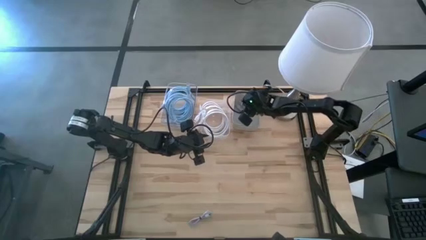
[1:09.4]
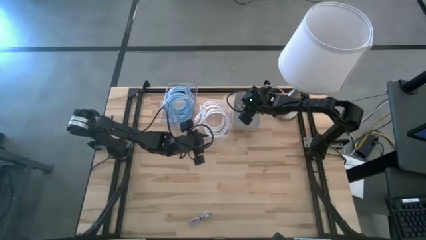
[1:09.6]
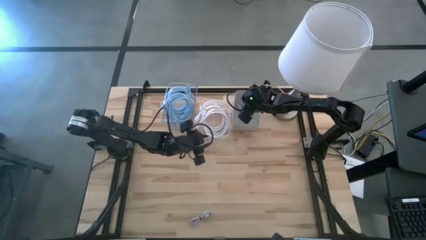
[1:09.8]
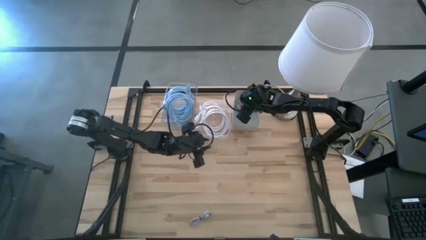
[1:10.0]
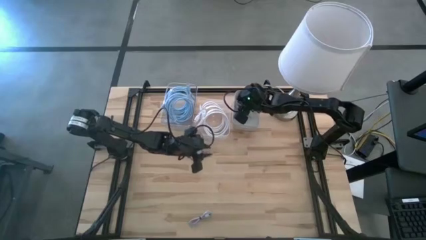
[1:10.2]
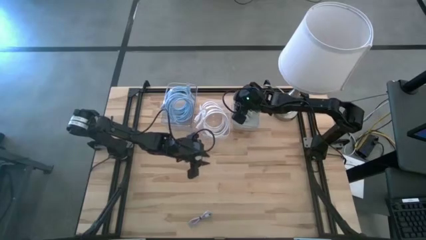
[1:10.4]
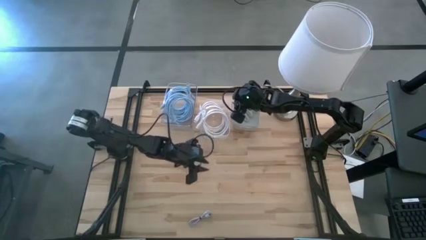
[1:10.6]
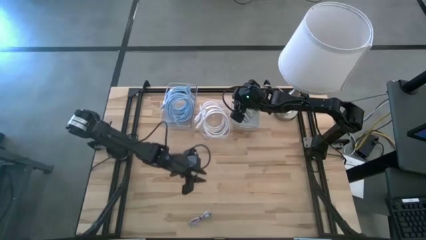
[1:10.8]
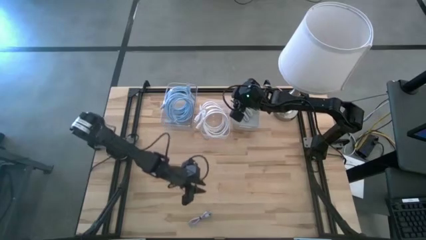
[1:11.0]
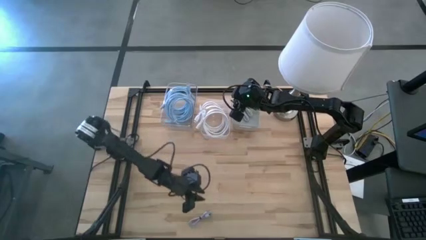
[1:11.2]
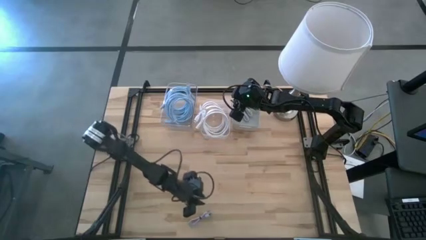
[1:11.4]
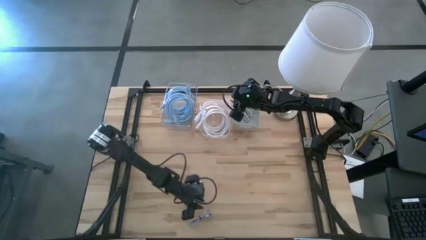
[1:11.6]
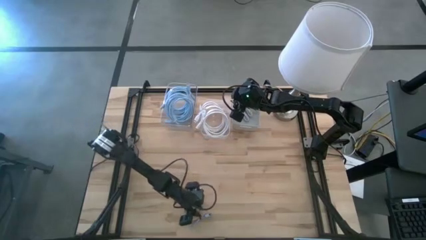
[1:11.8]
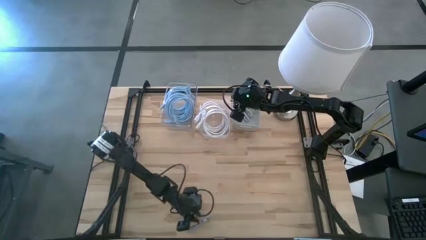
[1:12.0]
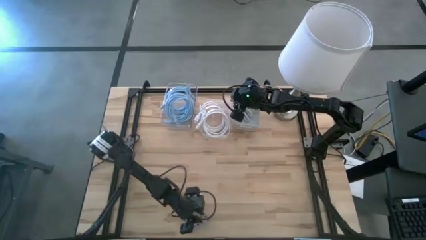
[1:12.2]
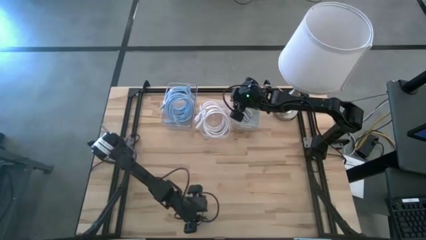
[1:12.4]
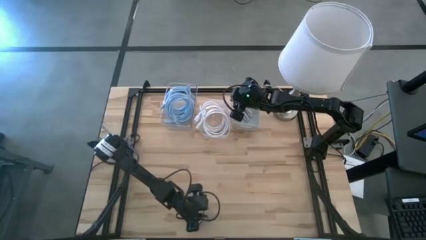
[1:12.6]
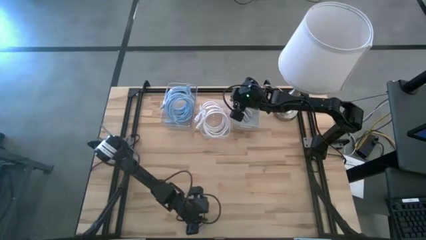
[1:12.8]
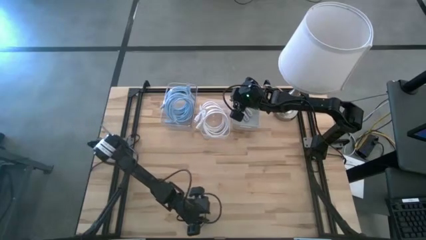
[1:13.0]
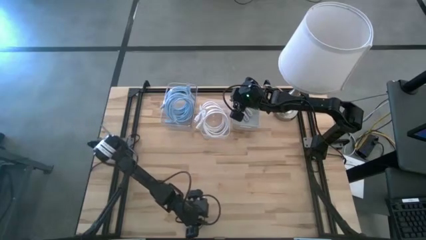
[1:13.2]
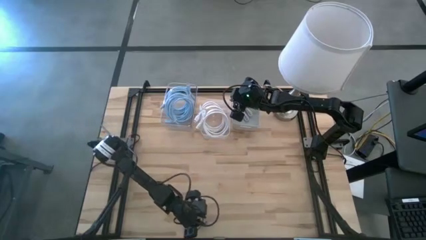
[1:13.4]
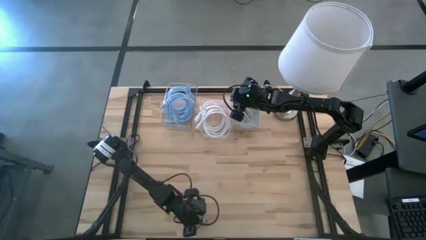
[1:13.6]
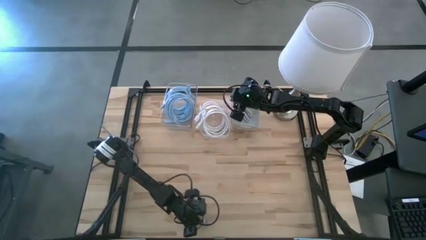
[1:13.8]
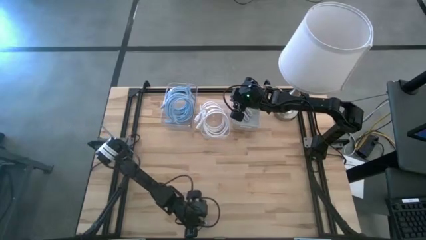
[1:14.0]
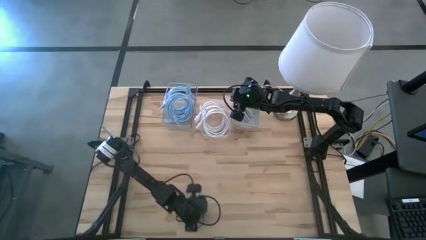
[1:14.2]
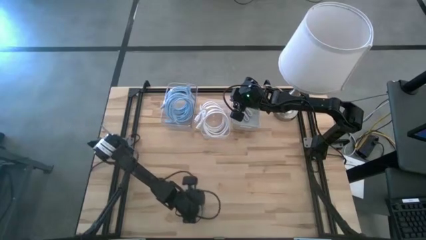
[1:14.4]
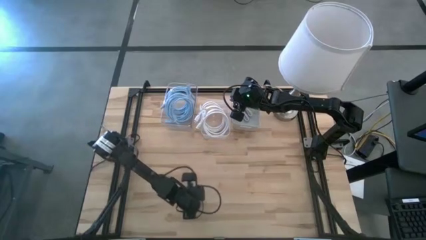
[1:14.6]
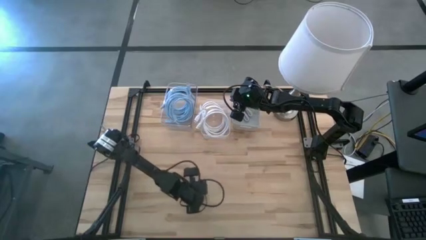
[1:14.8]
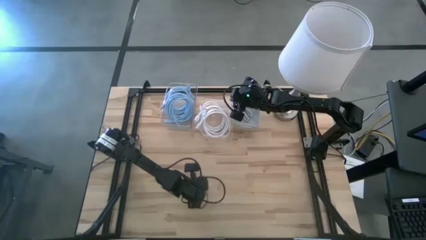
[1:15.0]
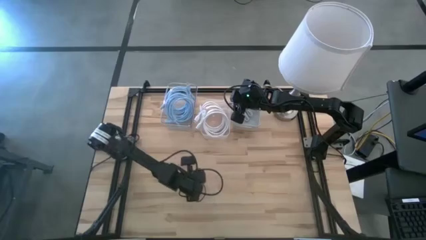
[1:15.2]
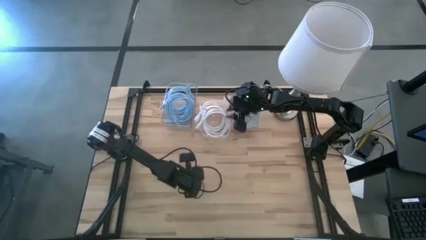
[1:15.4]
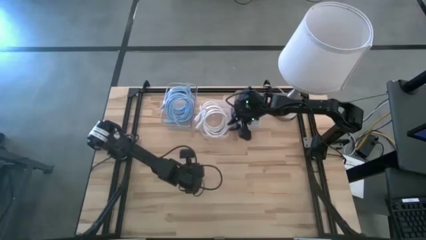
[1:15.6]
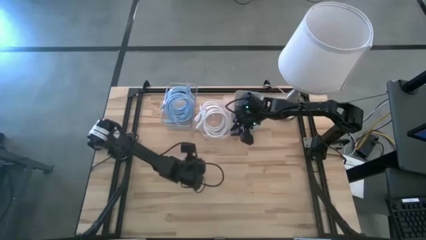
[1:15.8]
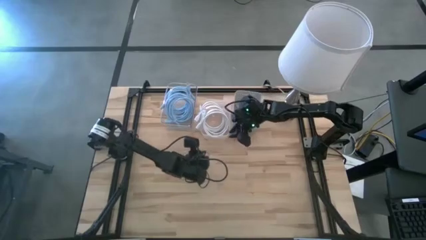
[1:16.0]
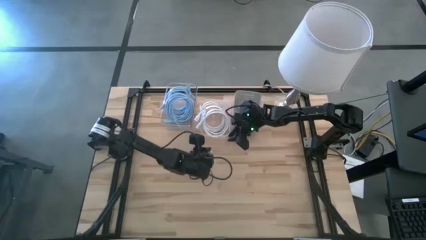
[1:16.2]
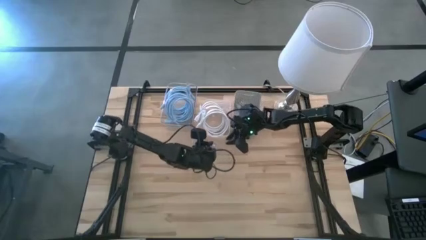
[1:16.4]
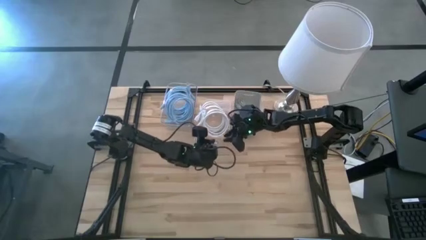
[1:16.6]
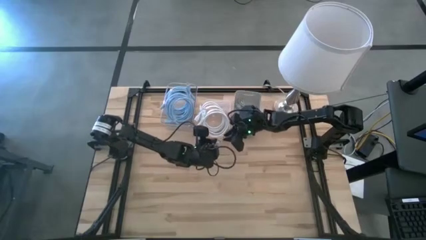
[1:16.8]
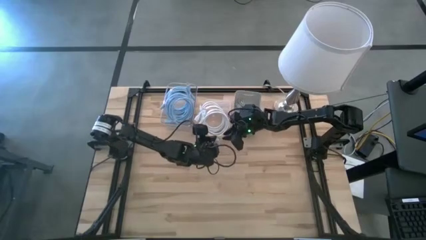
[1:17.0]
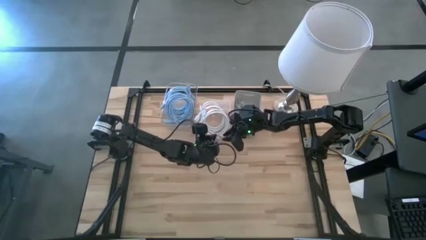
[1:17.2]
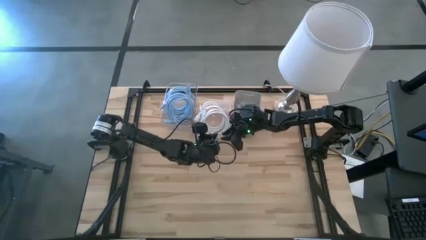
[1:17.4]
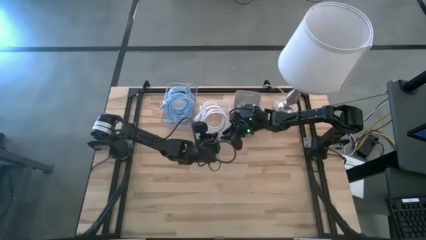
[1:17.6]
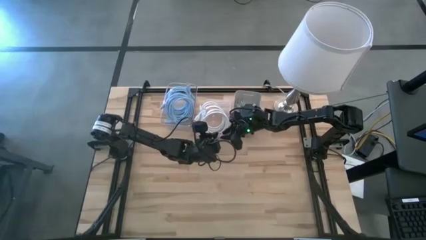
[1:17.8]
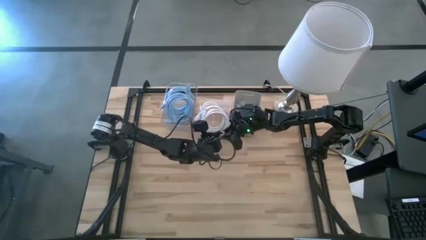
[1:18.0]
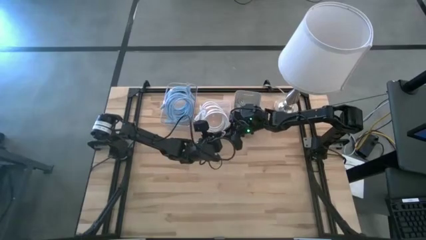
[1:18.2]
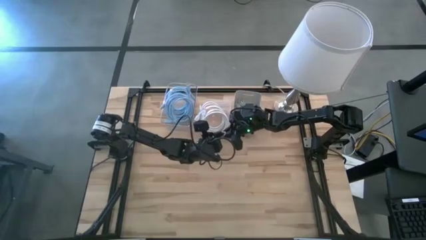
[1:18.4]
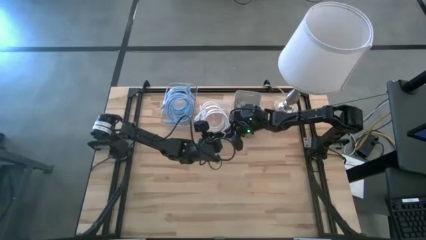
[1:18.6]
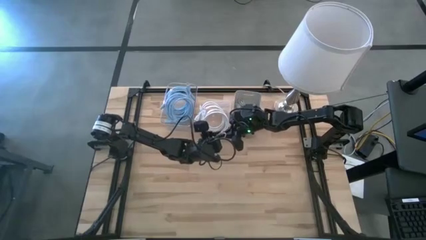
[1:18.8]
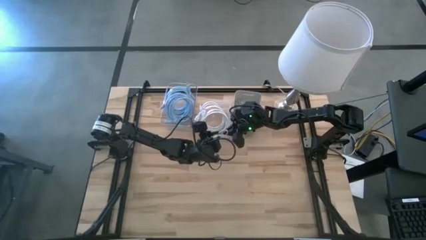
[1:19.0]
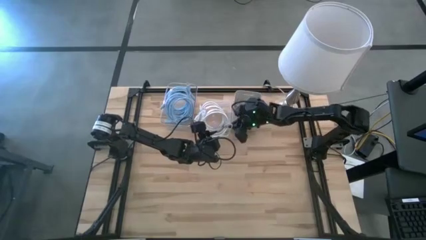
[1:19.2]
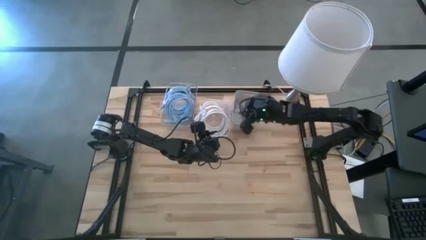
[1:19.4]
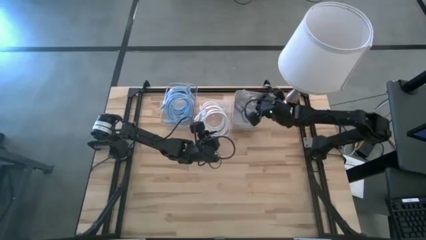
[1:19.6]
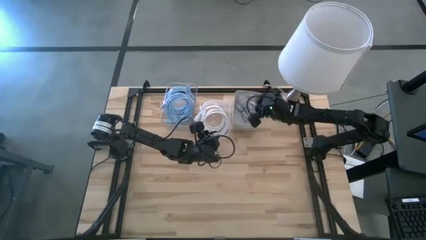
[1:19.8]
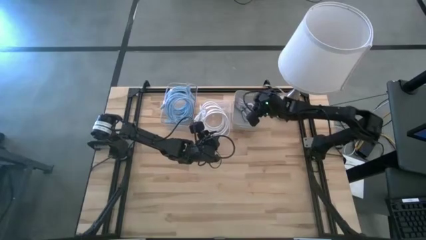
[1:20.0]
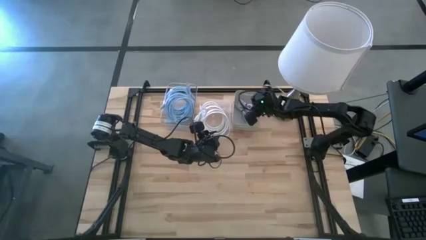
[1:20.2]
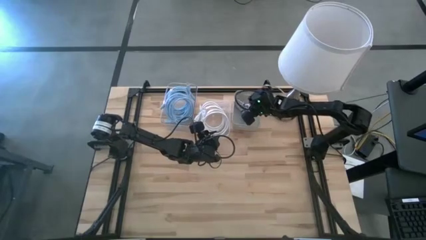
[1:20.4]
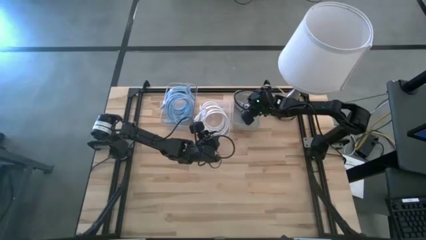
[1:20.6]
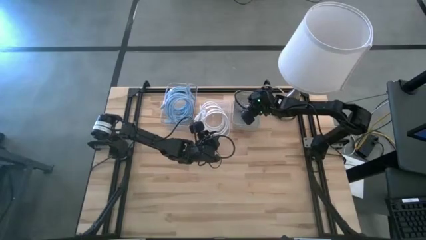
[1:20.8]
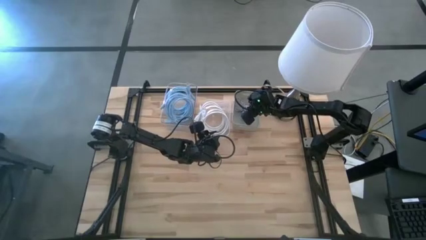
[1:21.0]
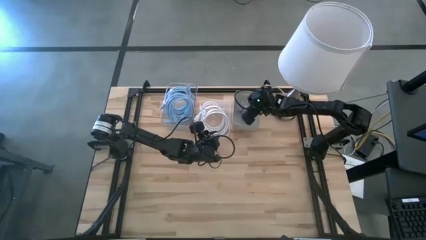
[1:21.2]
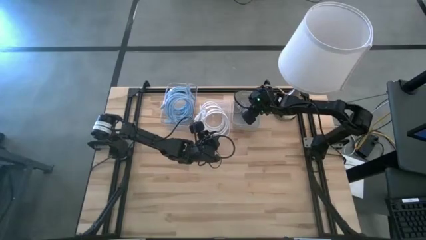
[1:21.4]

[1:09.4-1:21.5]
Task: Pick & Place USB Port
Put the purple charger cable into the white bin
